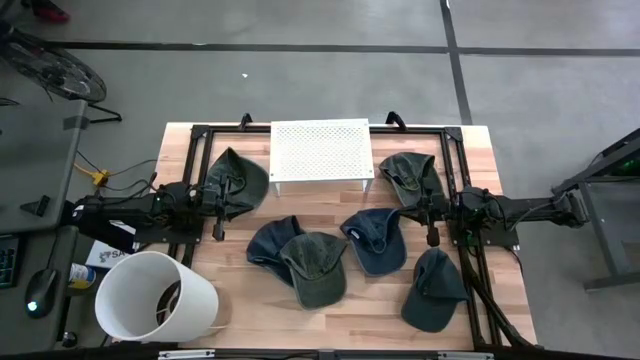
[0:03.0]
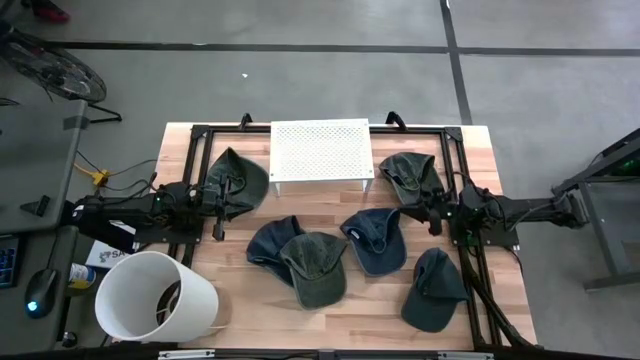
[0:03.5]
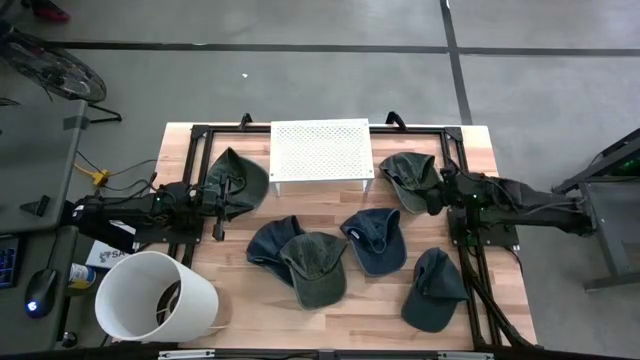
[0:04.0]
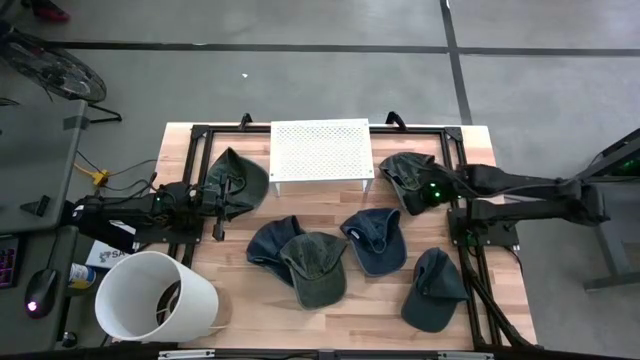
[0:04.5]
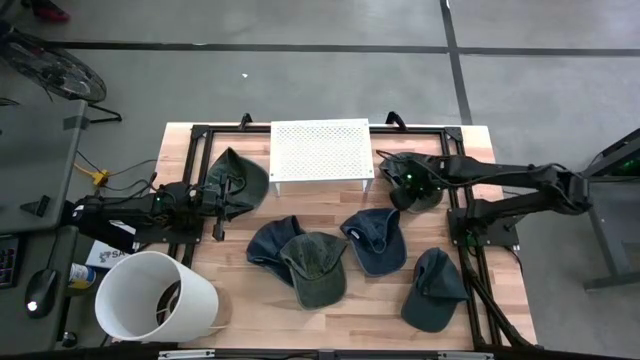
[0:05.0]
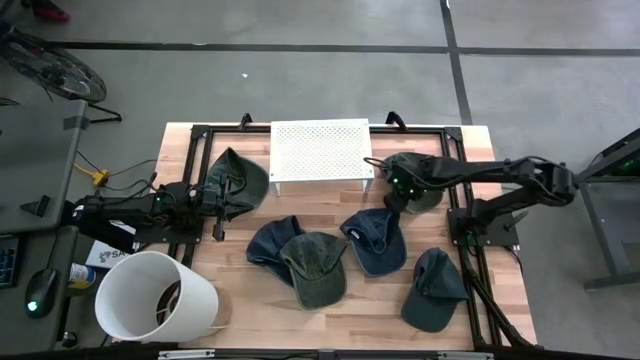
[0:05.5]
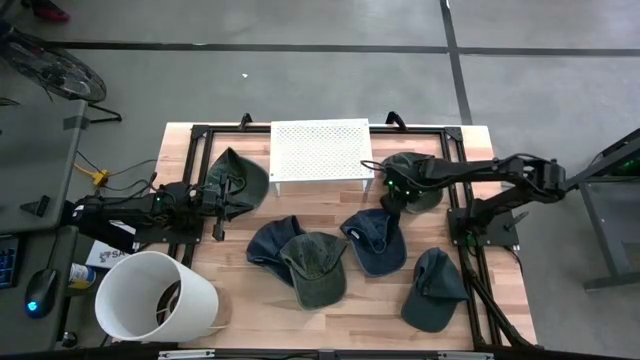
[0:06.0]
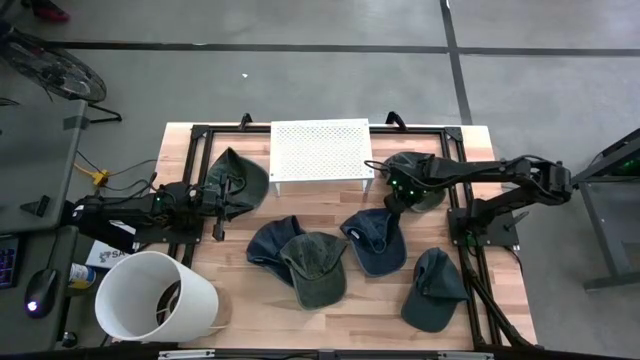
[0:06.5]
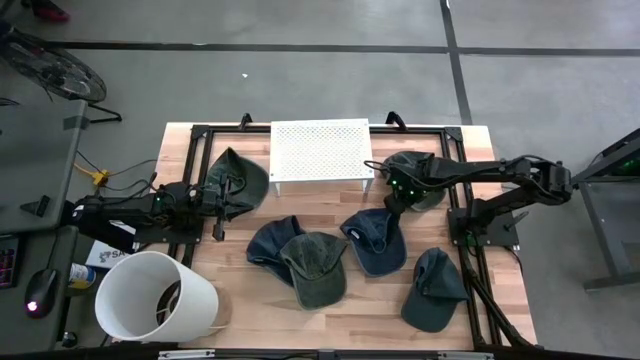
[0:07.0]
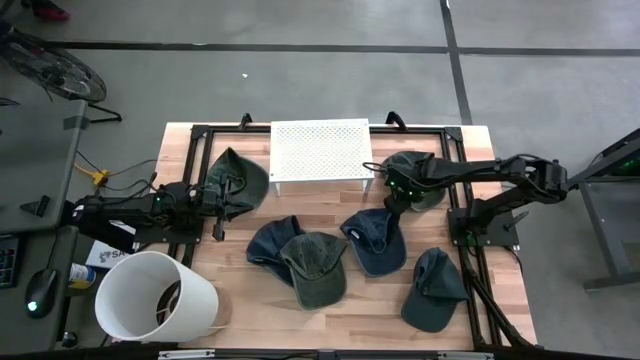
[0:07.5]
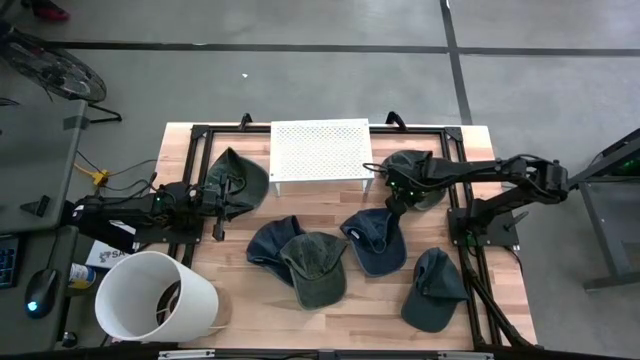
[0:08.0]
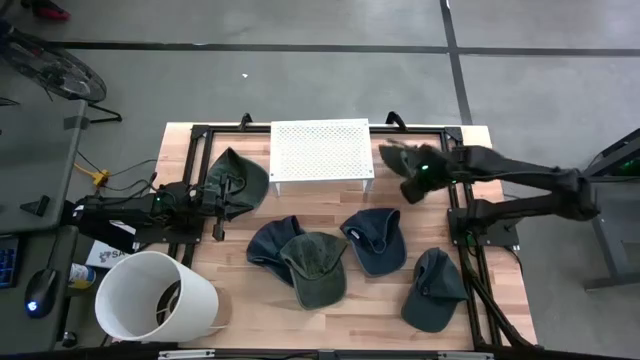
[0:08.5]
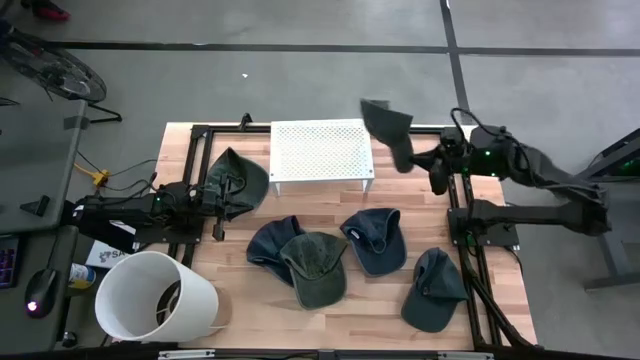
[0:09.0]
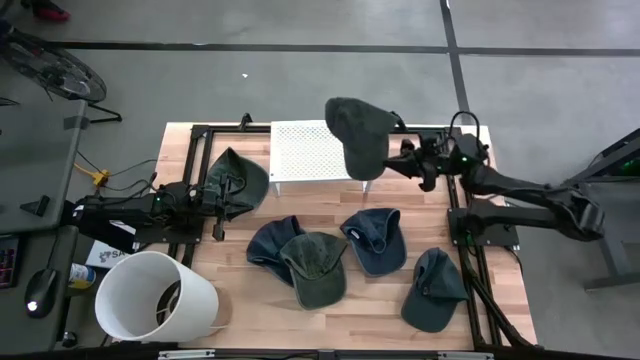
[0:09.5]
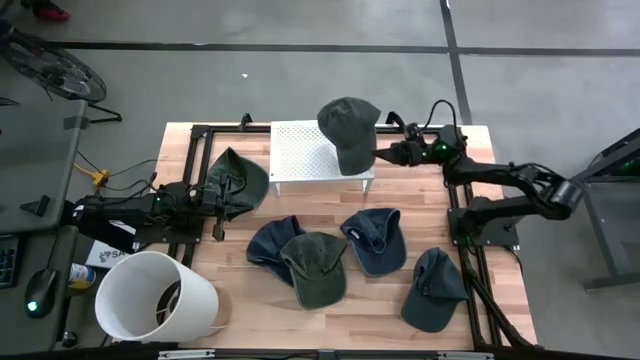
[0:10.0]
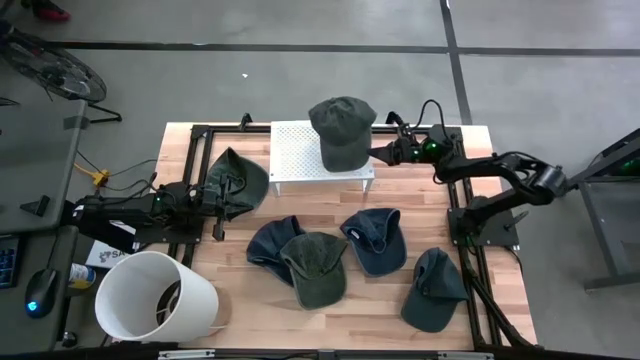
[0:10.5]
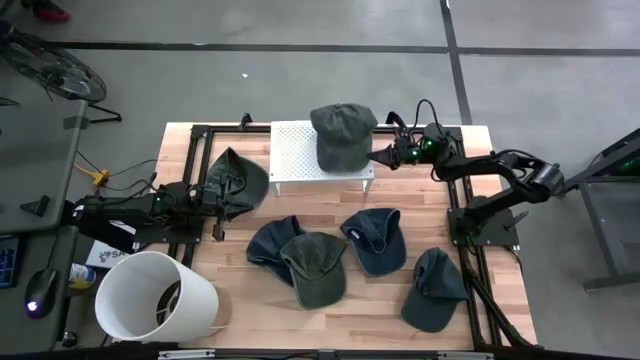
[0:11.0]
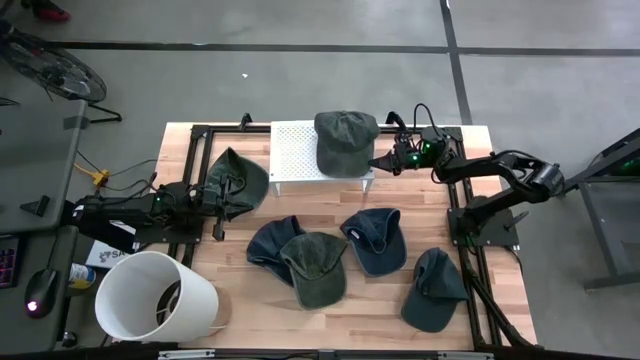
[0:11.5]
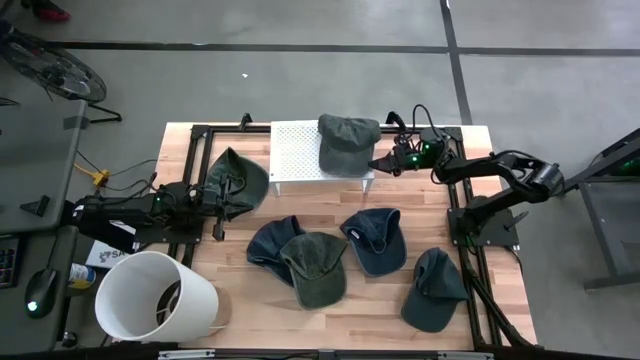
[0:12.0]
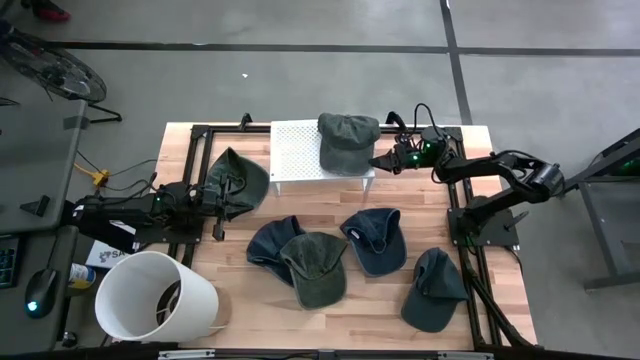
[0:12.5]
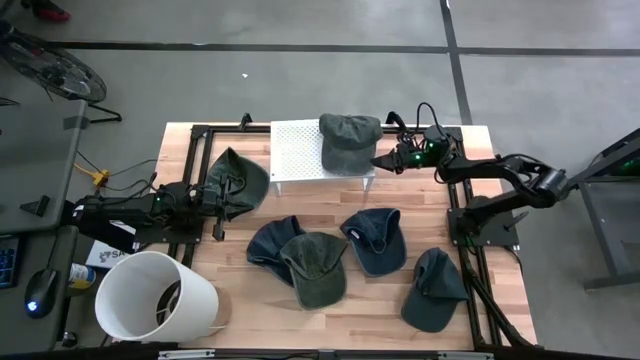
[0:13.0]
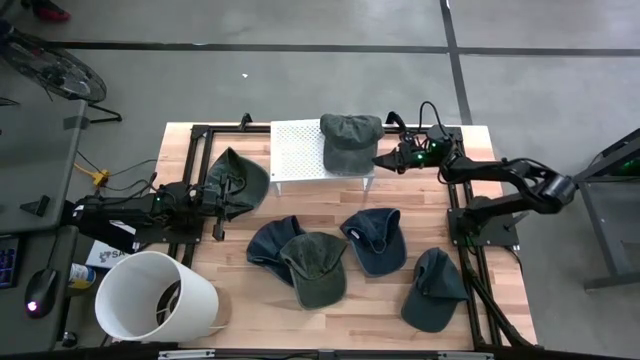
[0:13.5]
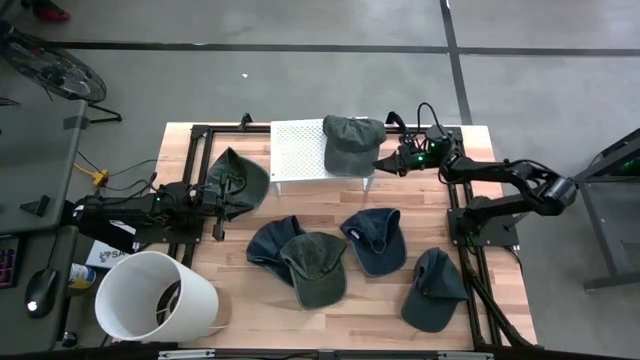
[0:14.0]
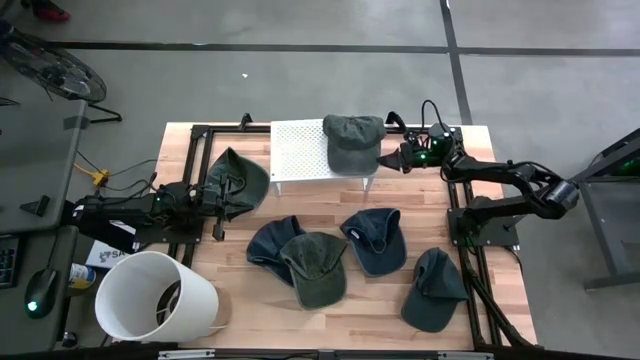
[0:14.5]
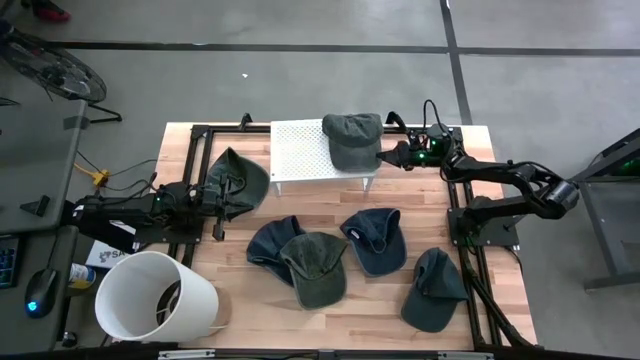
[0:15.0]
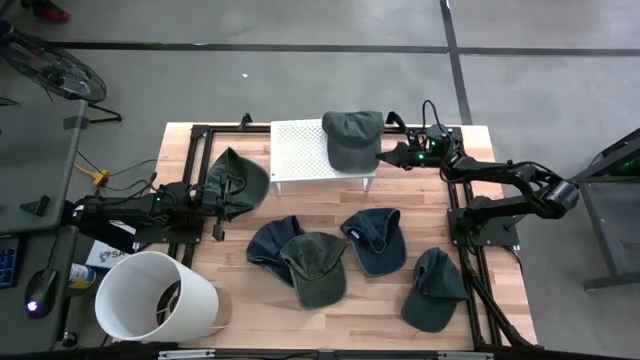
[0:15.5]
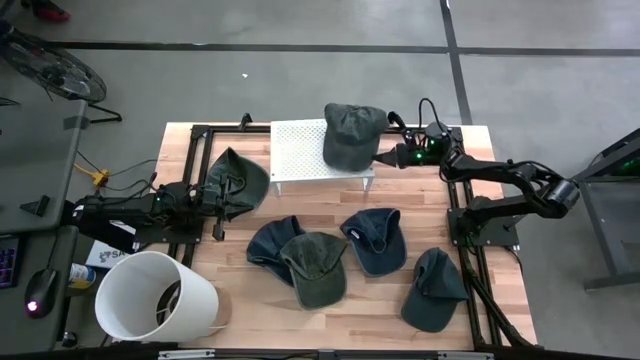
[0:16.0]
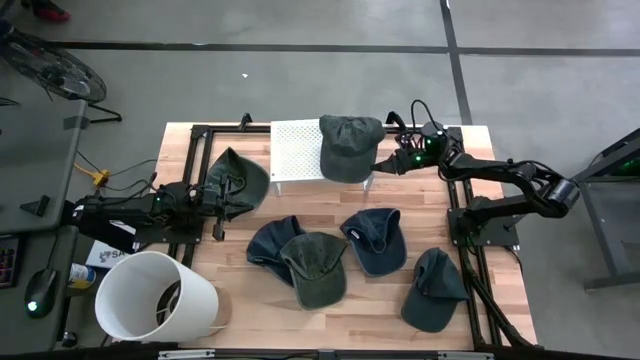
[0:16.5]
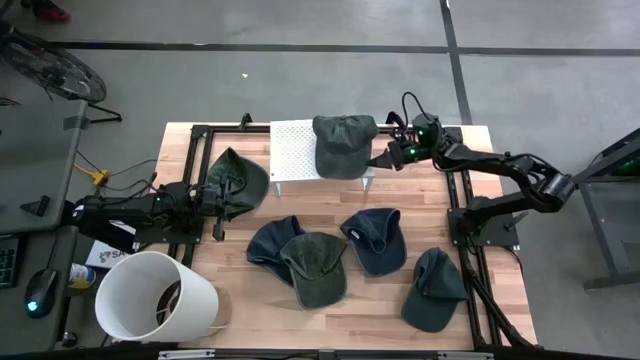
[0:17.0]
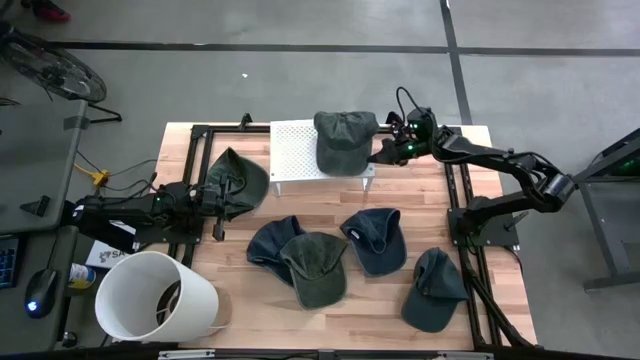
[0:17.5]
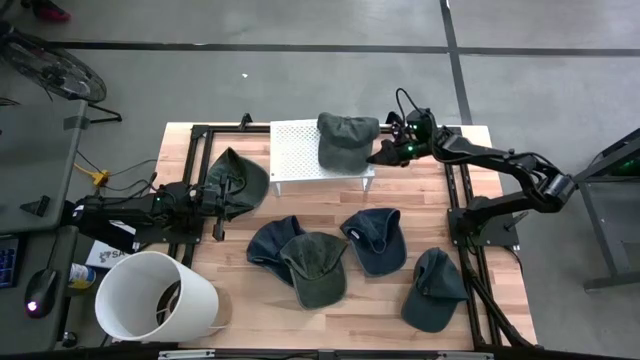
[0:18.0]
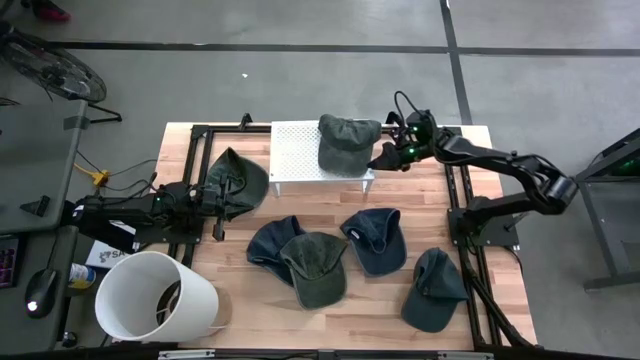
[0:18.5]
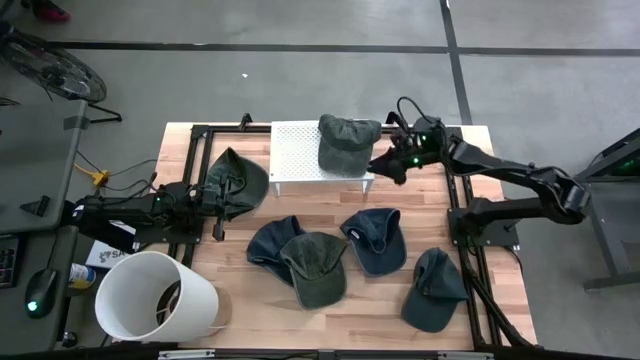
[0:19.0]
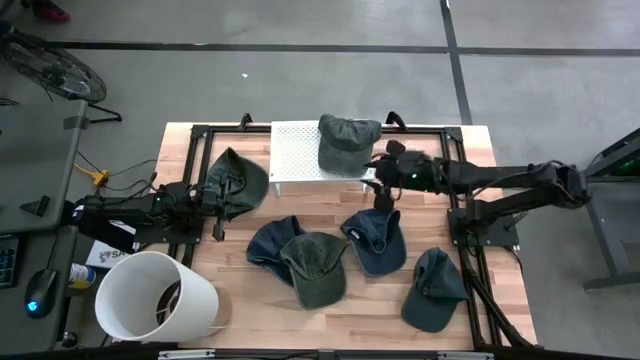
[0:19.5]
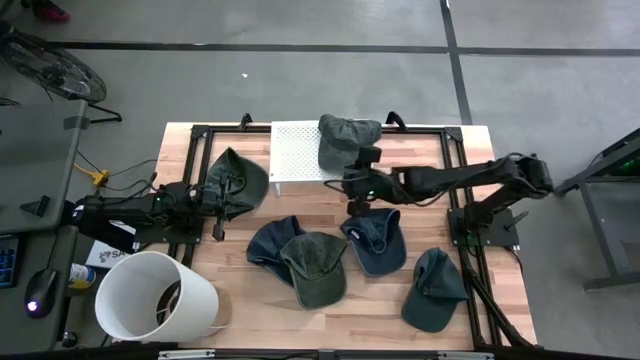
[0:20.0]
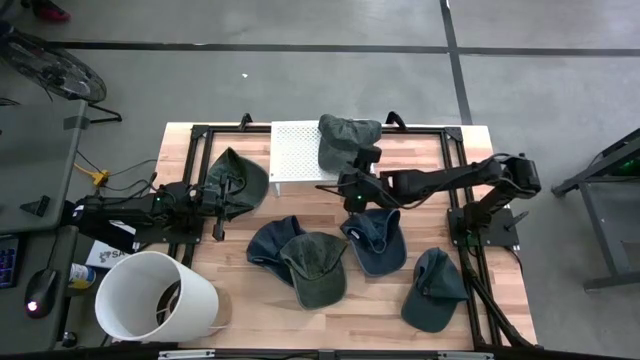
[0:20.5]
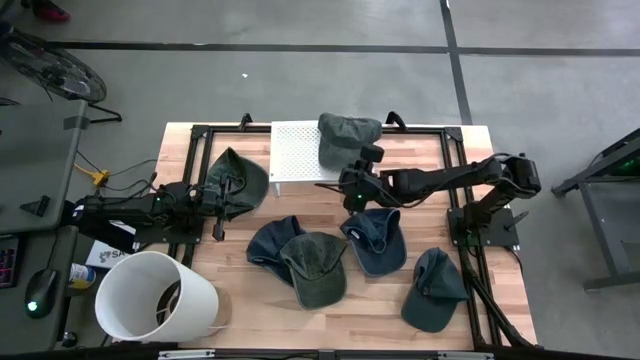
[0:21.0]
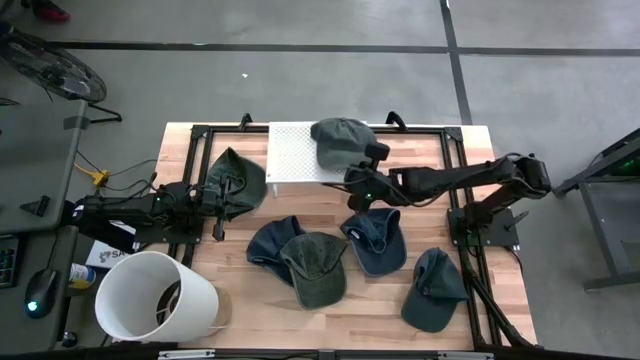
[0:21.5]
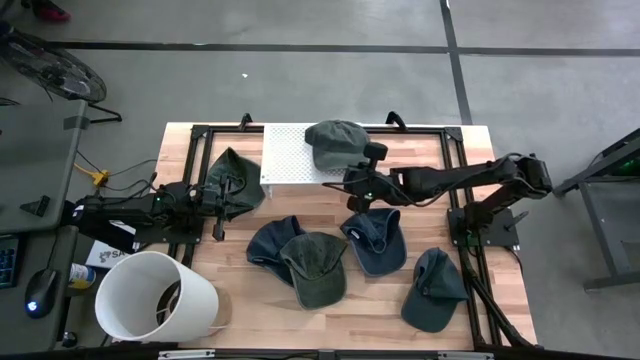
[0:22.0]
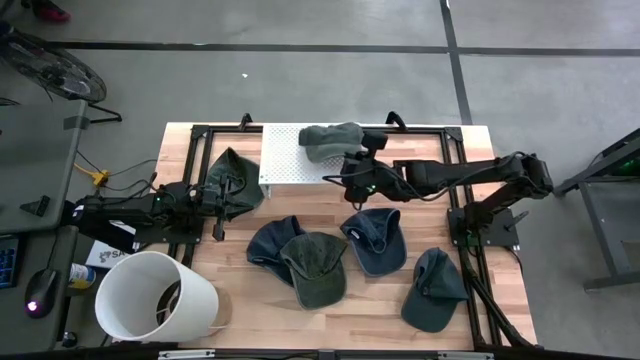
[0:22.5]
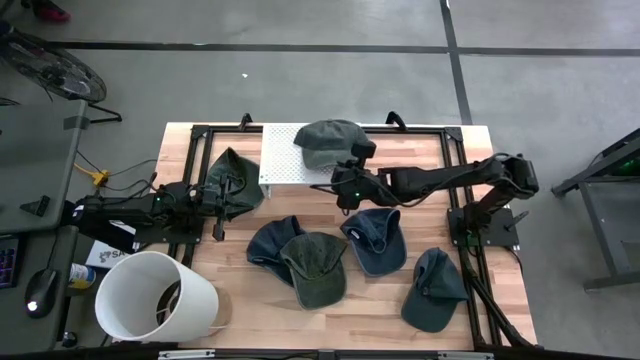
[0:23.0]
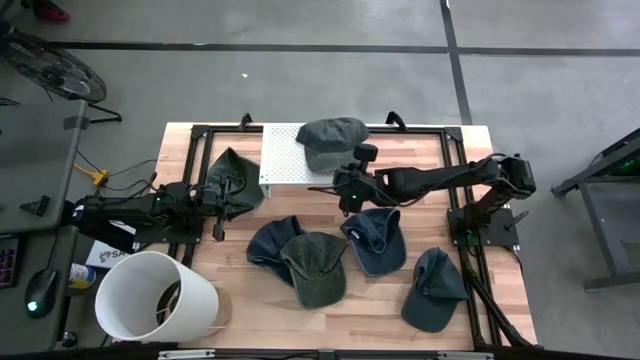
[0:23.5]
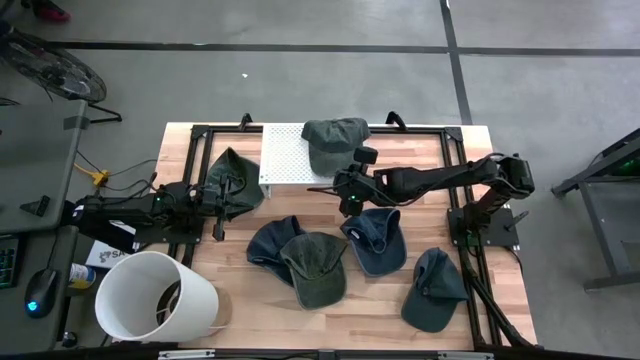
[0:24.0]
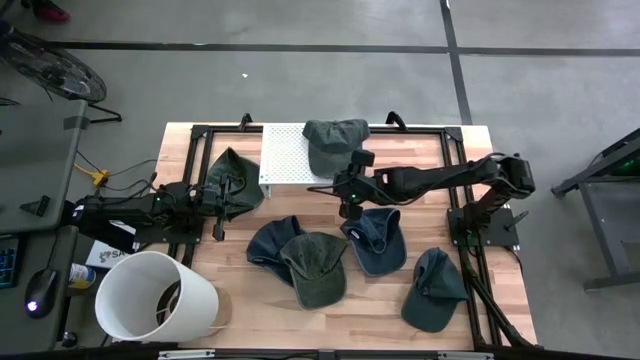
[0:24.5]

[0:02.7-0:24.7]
Task: Pick & Place hat
Put the top right gray cap on the shelf
